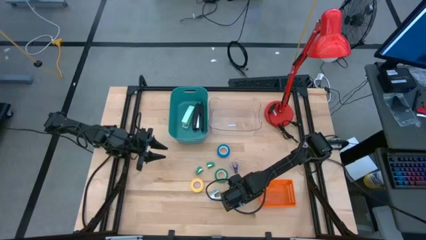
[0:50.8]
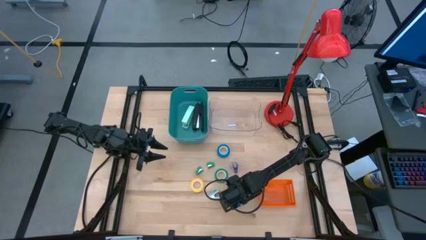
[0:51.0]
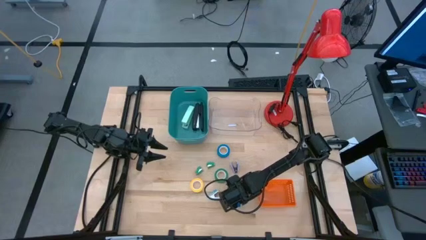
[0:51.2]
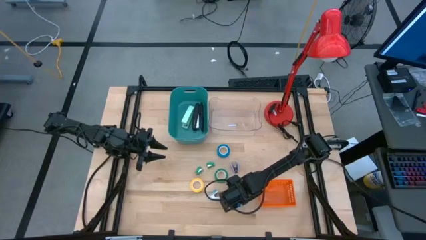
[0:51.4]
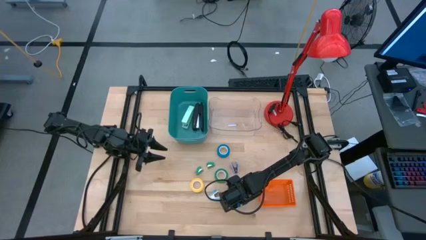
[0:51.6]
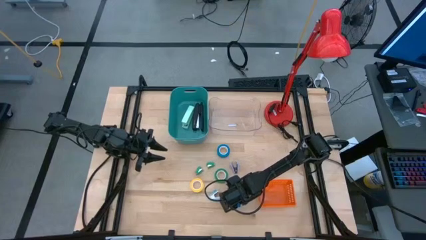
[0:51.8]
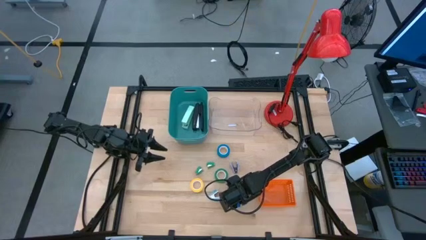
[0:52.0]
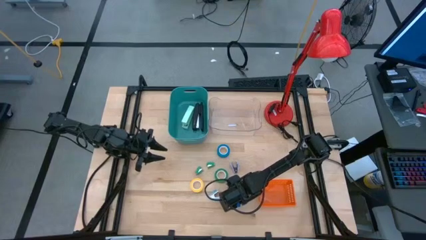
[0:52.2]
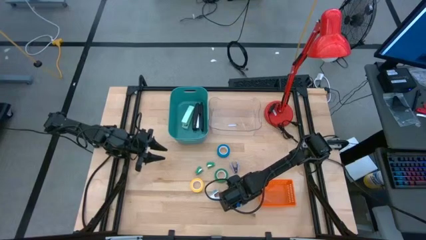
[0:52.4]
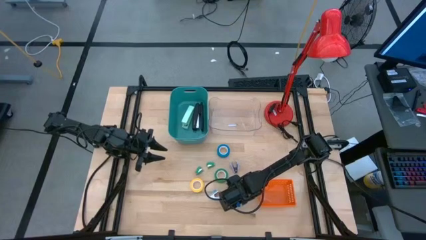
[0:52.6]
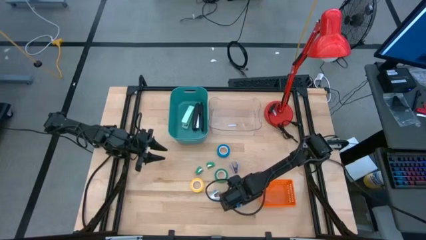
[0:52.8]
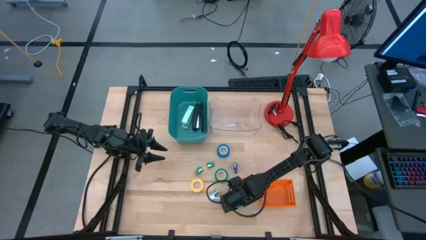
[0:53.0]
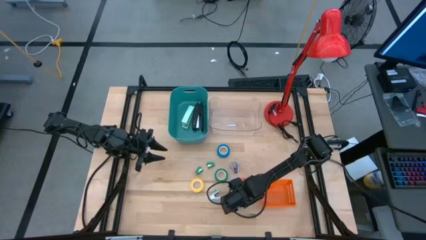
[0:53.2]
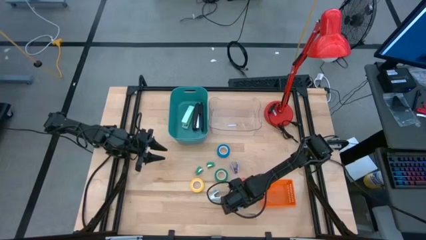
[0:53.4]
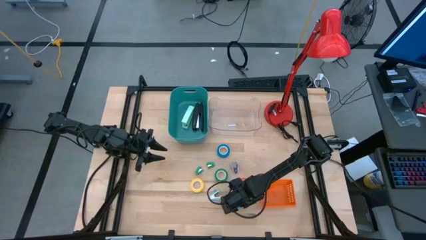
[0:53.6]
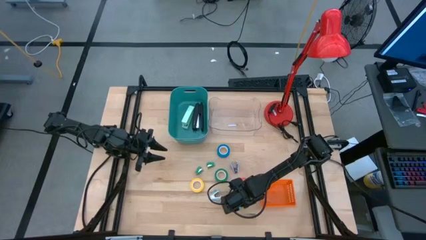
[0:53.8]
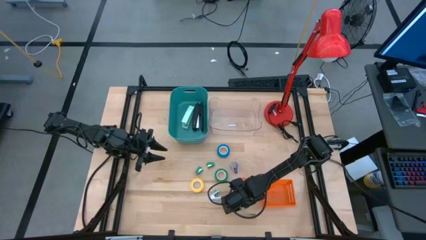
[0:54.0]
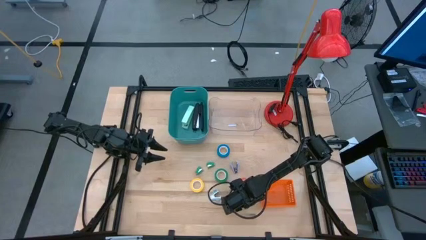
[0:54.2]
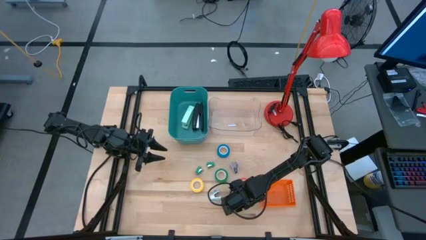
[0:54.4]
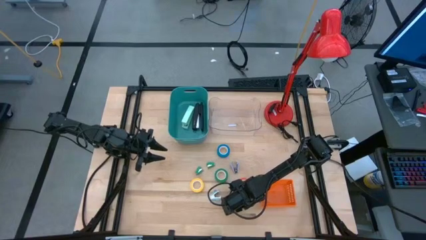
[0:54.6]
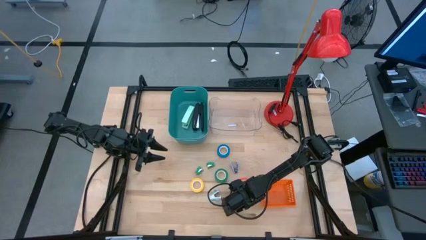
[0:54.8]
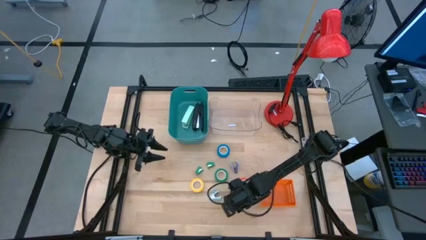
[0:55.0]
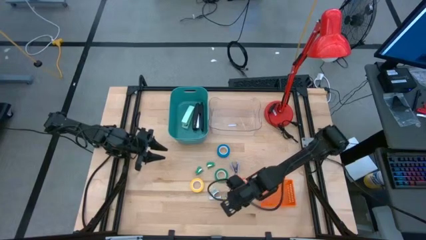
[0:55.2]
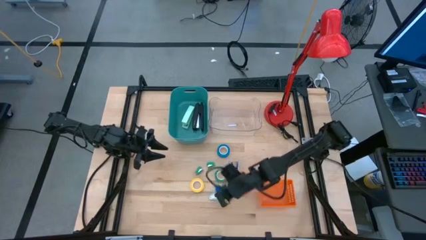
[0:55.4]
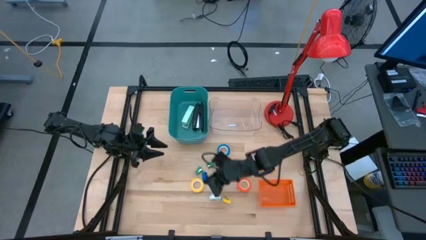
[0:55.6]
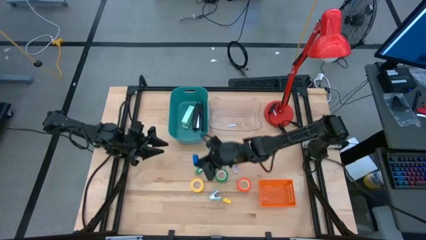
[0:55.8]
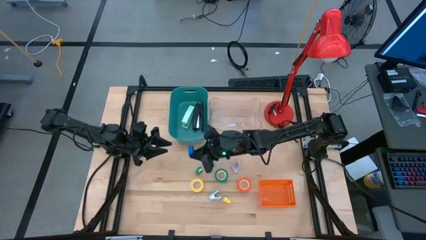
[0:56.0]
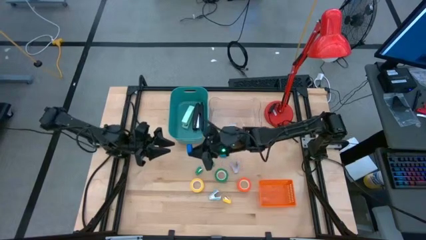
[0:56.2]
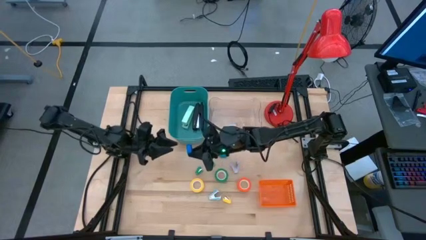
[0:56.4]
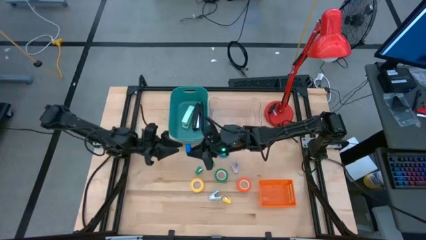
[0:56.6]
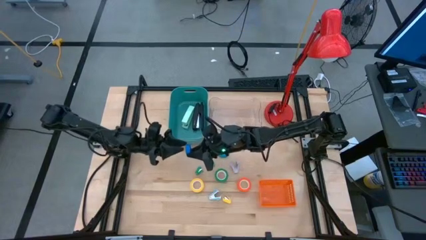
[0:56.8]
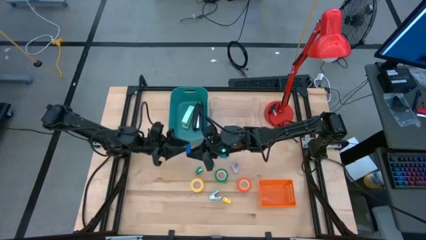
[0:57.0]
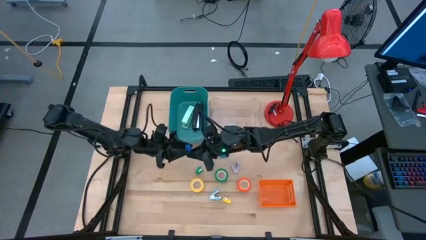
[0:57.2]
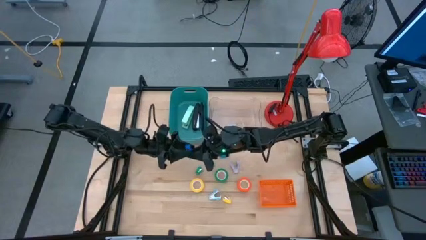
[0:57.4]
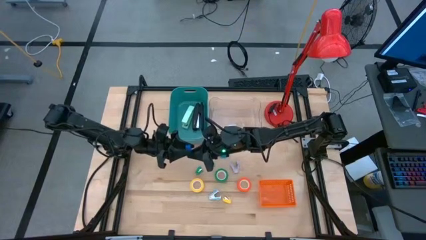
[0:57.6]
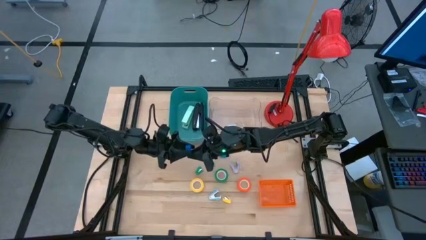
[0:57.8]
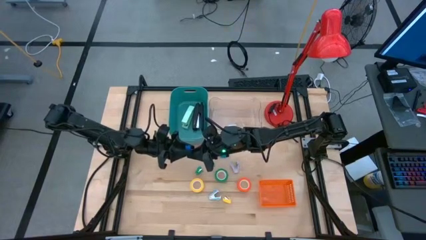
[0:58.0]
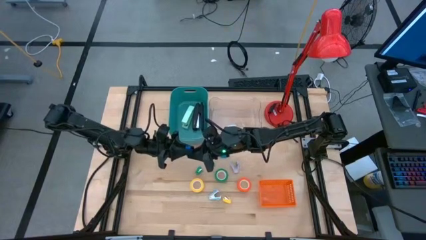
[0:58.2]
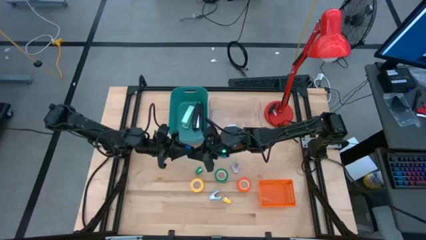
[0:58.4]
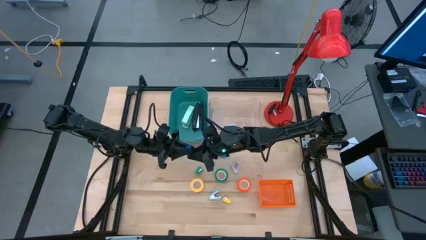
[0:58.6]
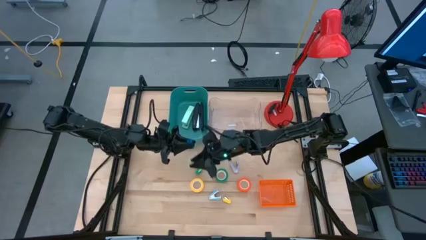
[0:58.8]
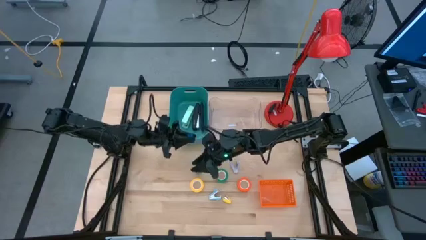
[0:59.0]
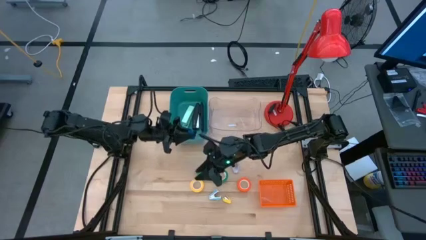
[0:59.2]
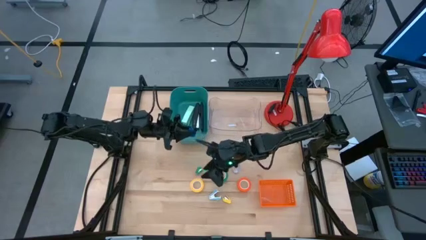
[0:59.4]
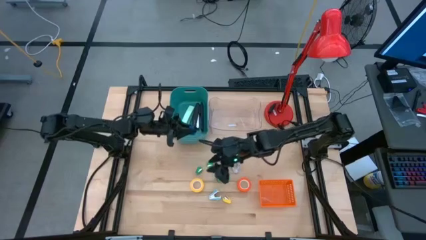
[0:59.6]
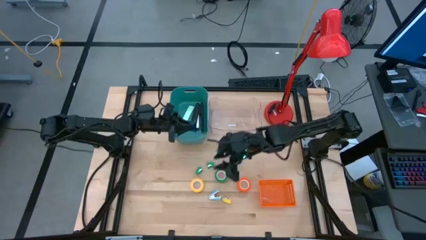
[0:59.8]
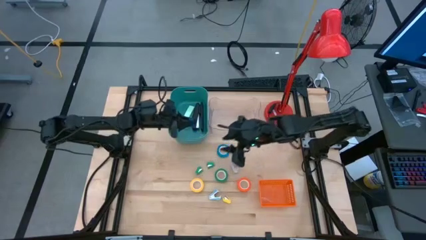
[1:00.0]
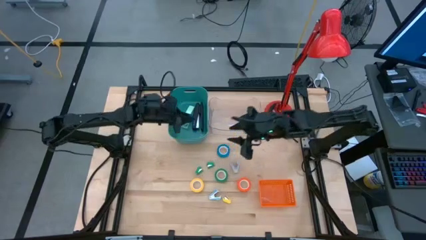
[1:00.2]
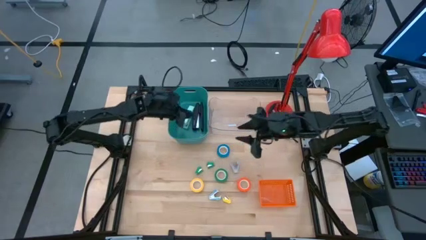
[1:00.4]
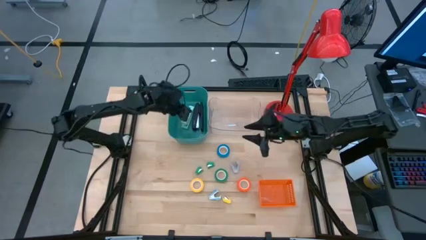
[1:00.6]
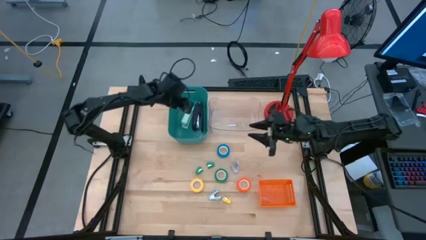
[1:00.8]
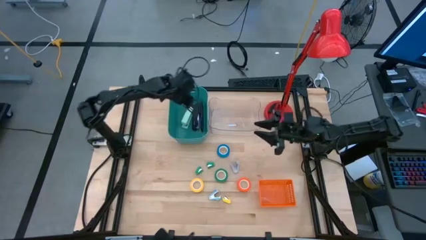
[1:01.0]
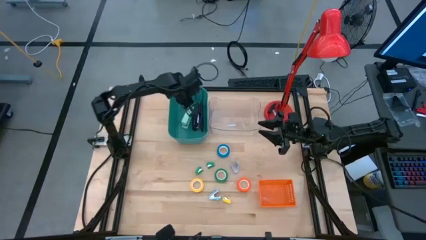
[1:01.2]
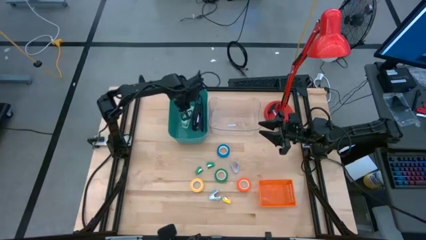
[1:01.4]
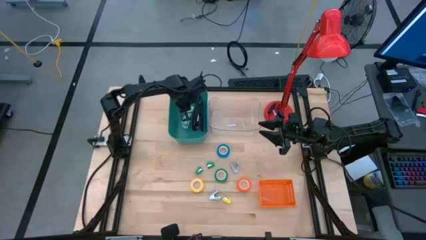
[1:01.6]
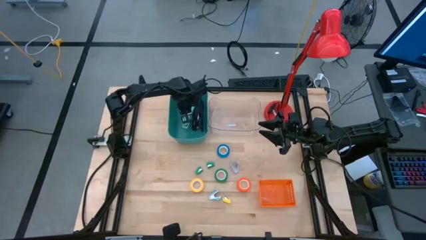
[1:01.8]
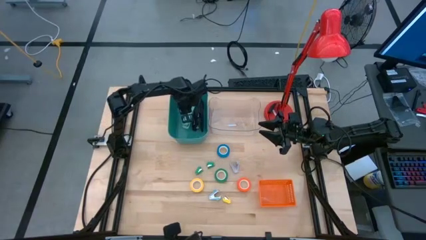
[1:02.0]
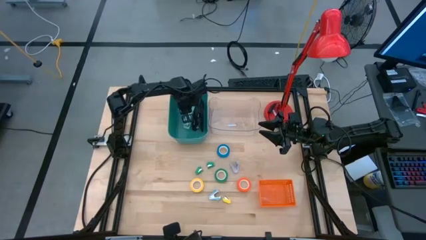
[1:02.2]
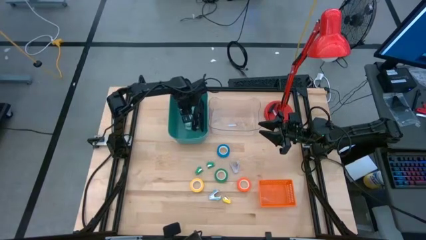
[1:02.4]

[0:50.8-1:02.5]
Task: Pick and place Stapler, Stapler remover, tape
Put the small blue stapler into the blue bin
